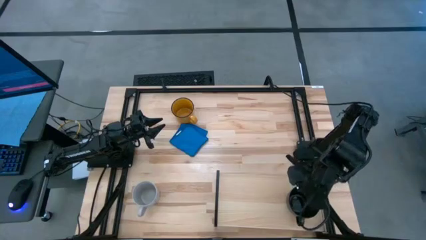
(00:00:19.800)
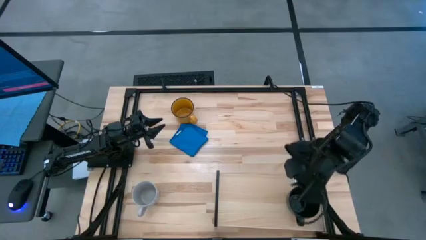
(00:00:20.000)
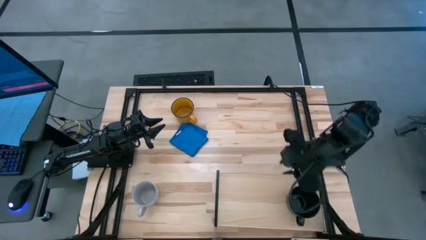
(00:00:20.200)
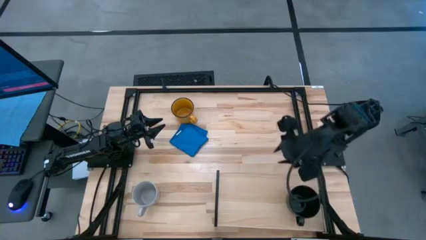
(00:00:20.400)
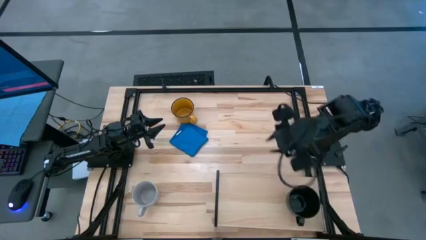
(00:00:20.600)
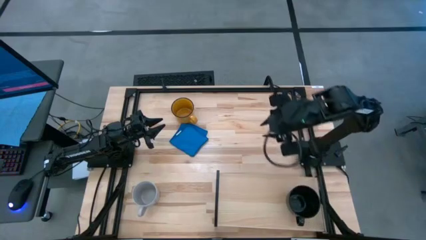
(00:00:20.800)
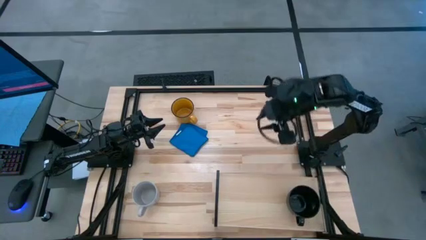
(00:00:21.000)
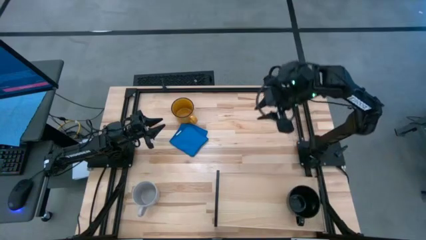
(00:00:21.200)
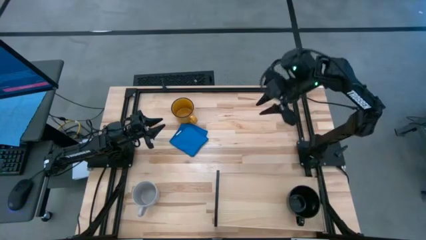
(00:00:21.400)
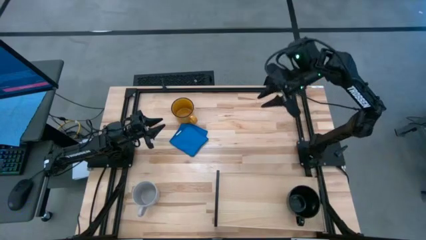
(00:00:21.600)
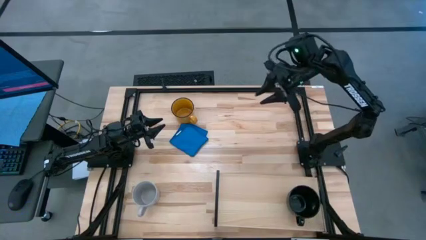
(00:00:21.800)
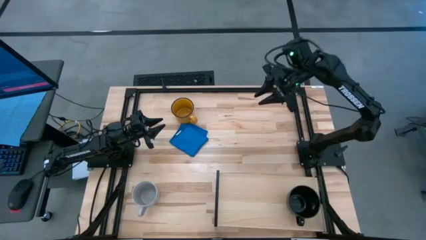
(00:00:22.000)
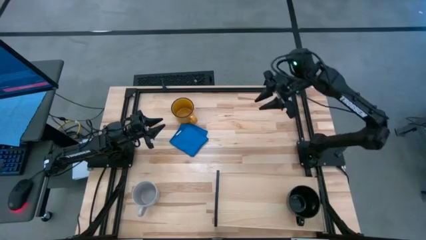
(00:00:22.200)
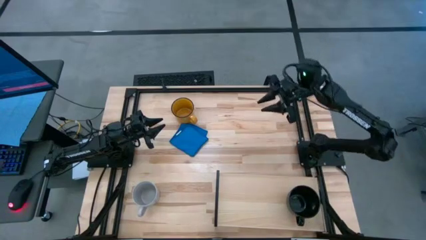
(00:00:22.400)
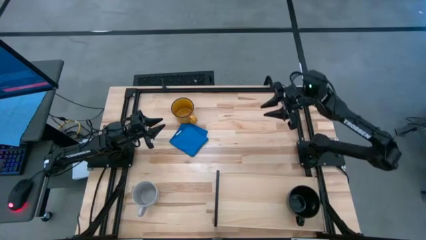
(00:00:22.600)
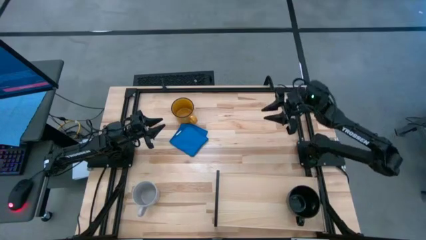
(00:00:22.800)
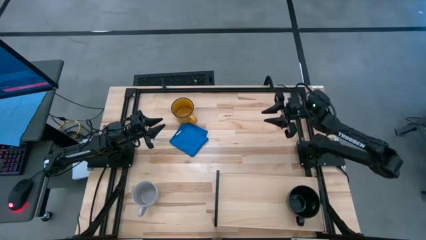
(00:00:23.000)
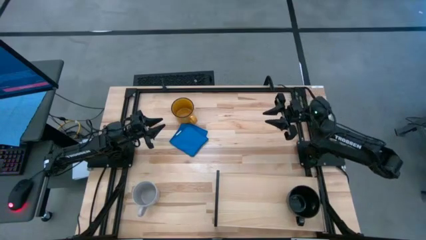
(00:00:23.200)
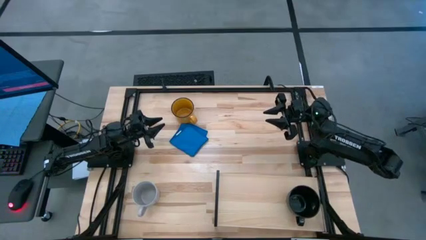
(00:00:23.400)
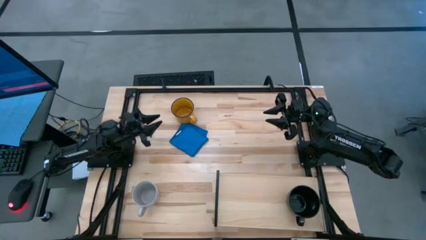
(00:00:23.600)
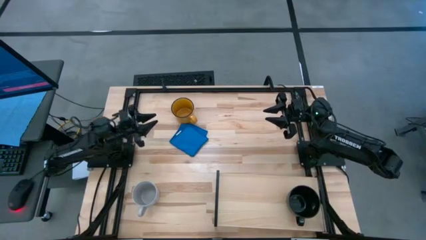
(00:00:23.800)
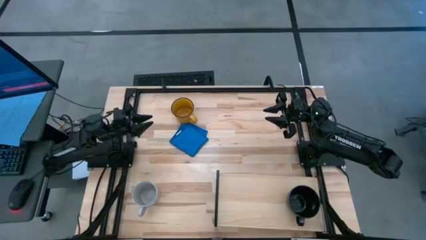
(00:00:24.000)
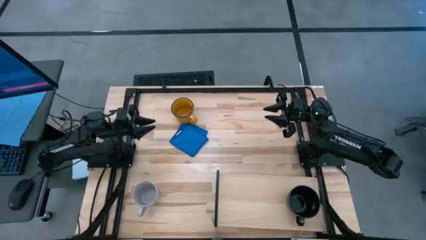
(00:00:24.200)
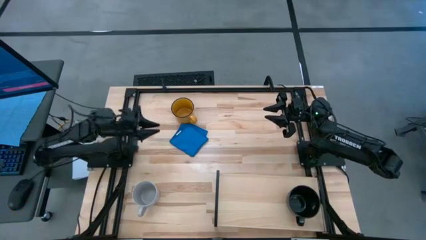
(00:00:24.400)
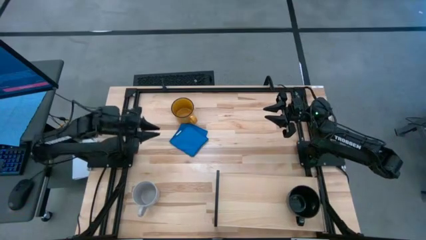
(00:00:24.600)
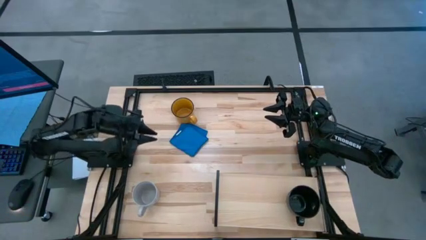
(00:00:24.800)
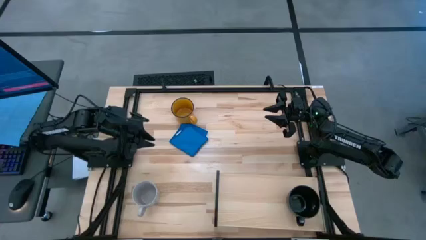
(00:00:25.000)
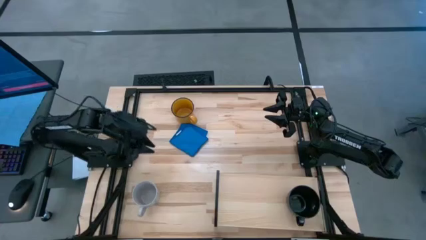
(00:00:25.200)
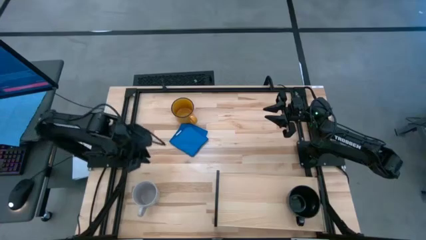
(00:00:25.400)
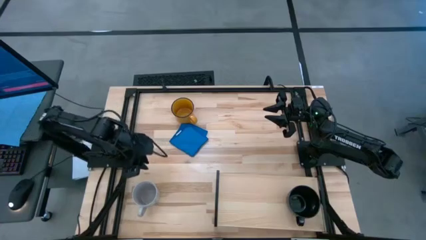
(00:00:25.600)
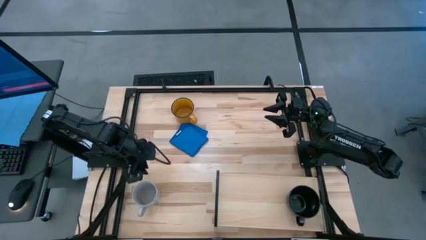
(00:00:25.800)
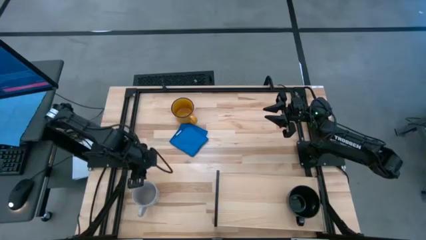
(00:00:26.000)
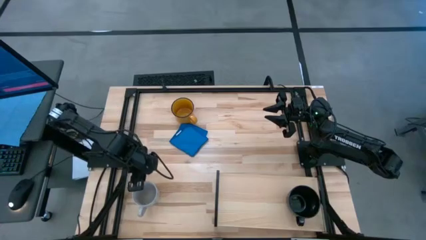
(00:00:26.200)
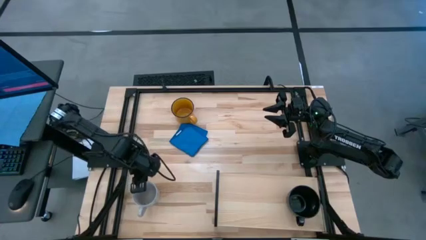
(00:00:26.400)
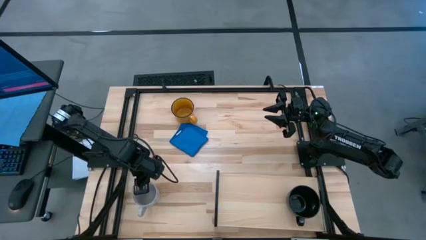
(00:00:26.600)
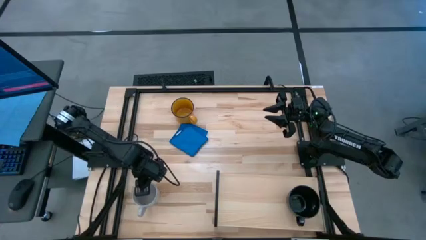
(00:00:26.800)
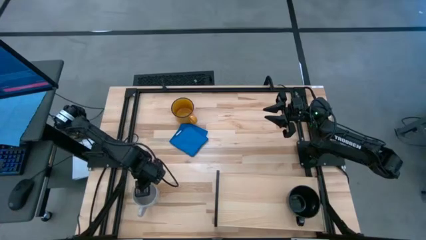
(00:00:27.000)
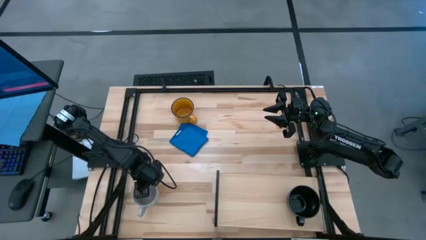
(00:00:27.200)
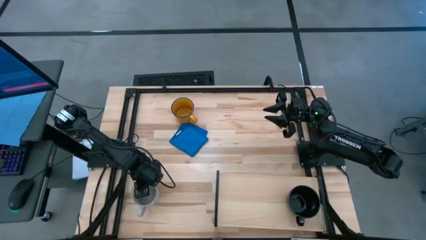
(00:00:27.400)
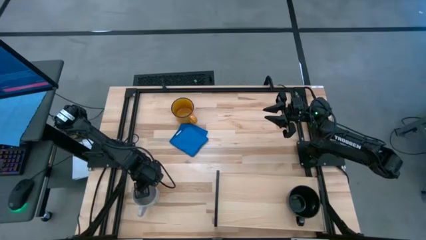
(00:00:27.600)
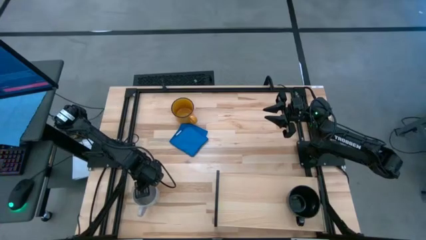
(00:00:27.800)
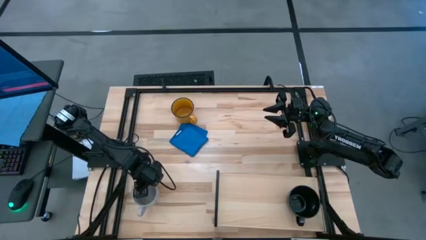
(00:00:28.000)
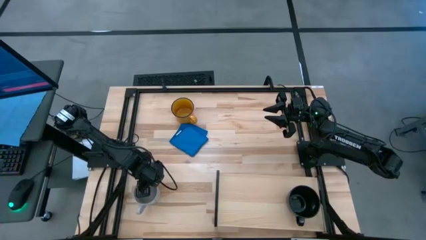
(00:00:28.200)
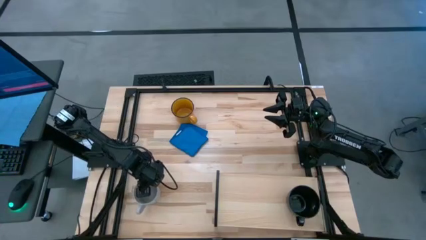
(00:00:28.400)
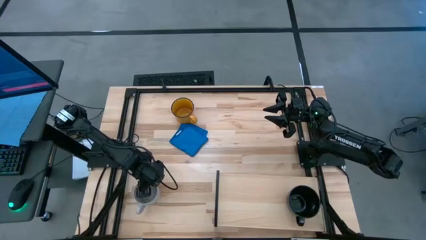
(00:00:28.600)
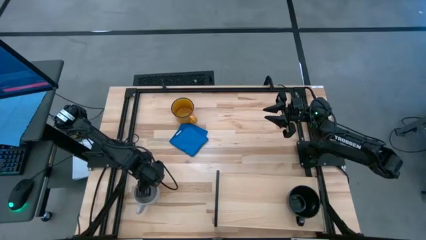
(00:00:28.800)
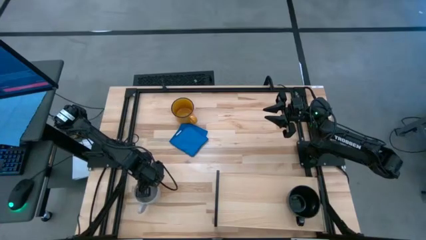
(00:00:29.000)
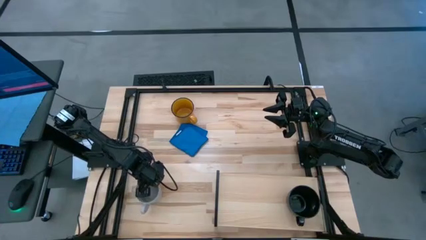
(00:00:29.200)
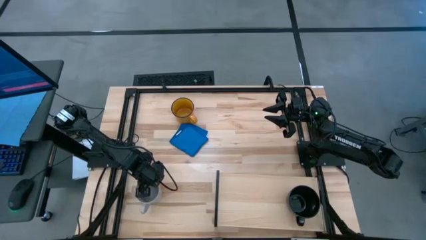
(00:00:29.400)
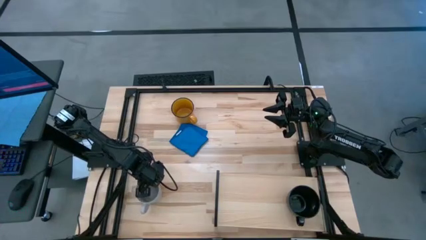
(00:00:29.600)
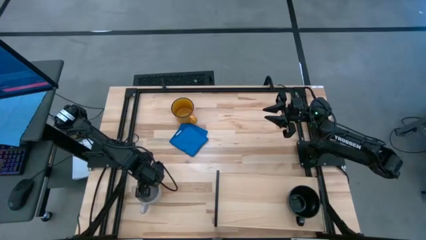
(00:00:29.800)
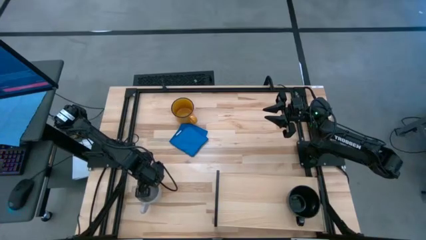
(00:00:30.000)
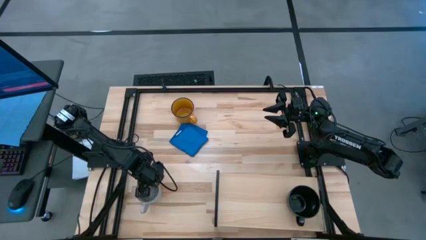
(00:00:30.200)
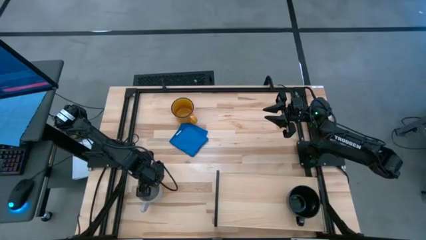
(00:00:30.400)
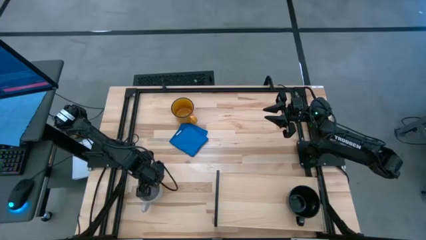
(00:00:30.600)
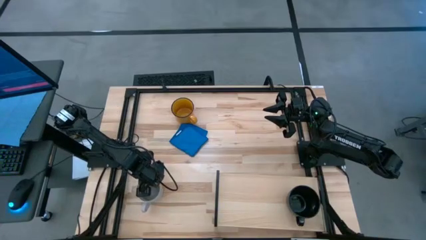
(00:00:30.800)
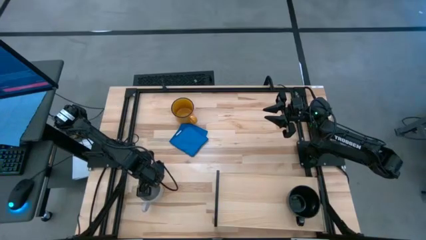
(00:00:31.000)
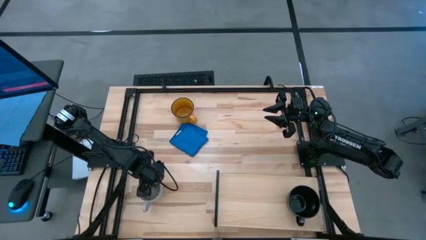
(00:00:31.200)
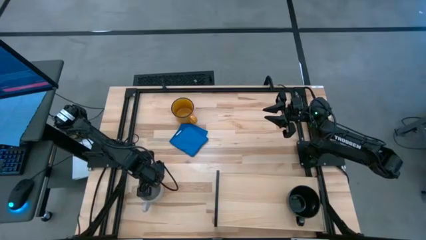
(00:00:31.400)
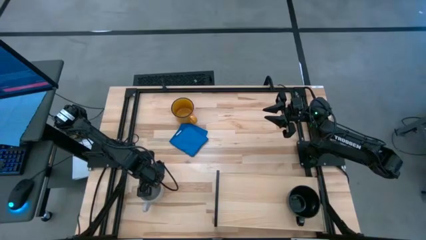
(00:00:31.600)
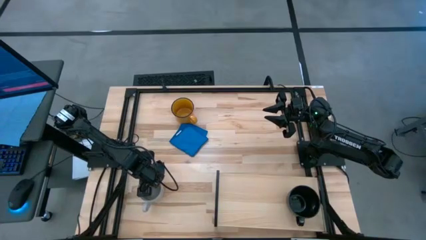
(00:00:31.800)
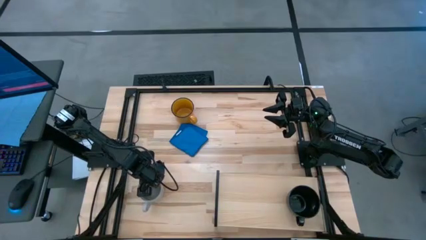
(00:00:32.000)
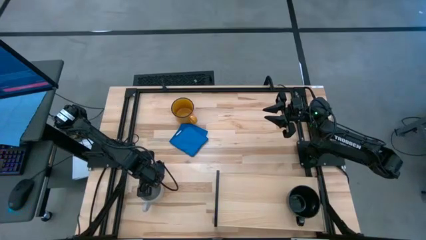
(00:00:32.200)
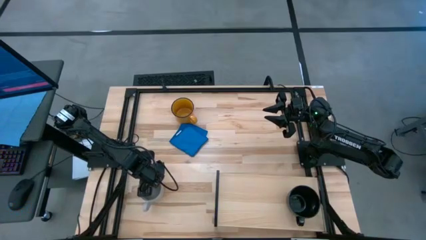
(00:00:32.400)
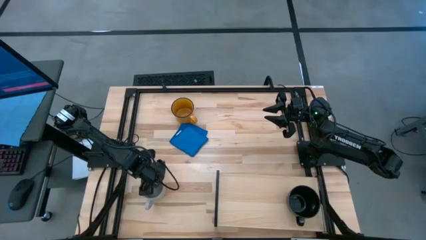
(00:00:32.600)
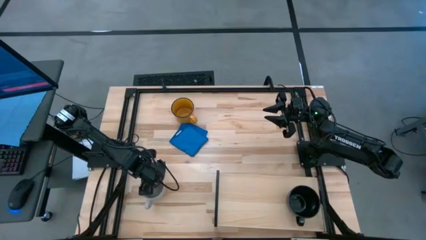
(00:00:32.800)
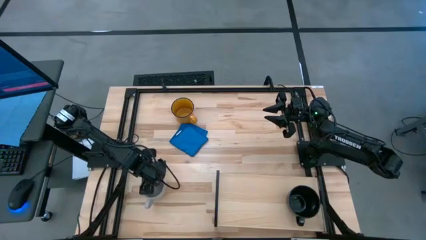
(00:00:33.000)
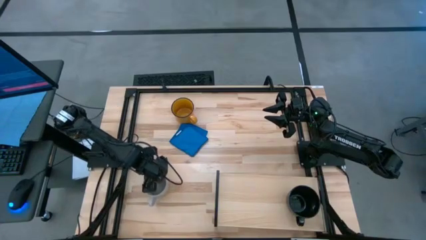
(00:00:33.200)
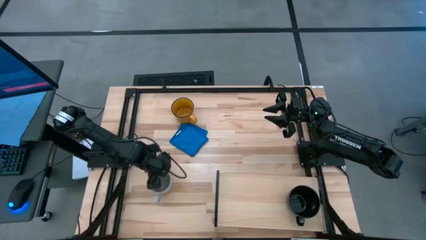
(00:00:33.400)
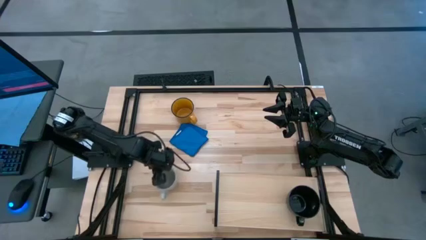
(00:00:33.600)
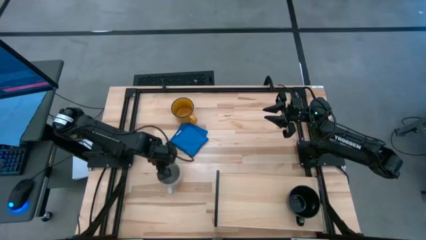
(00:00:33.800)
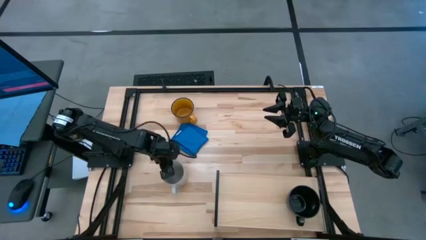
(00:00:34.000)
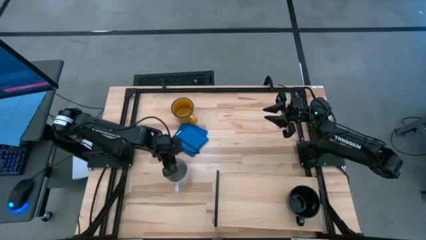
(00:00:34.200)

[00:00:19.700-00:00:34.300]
Task: Stack small to large cups/mugs on shelf
Put the gray mug on the shelf
